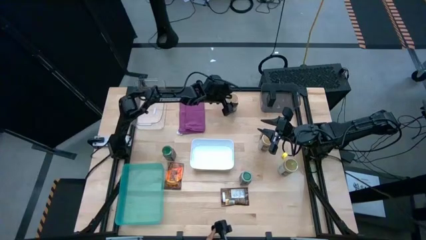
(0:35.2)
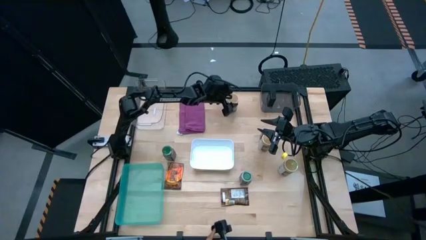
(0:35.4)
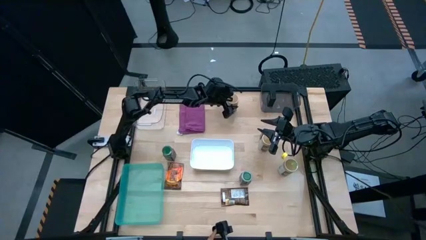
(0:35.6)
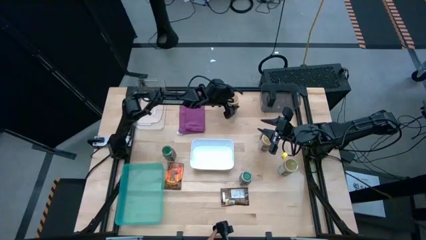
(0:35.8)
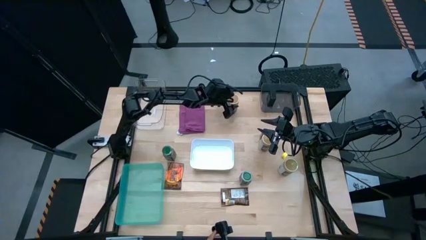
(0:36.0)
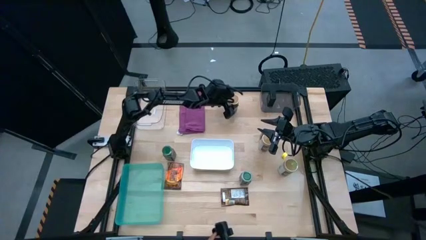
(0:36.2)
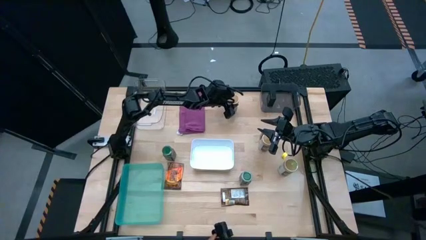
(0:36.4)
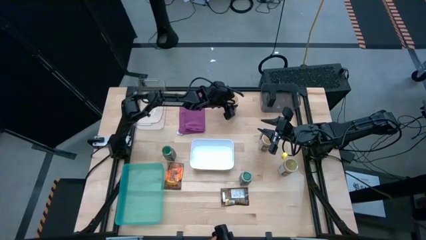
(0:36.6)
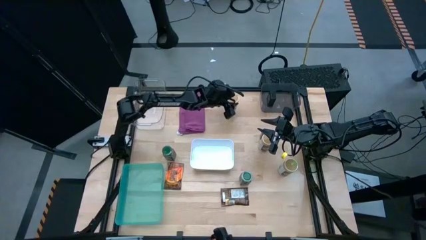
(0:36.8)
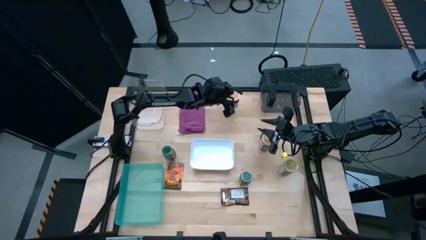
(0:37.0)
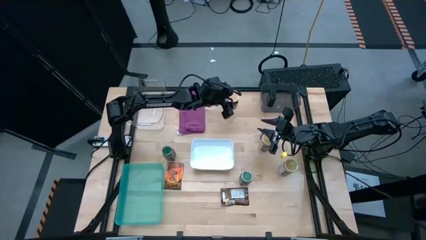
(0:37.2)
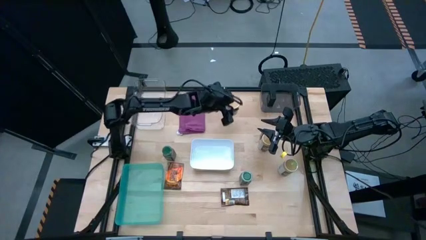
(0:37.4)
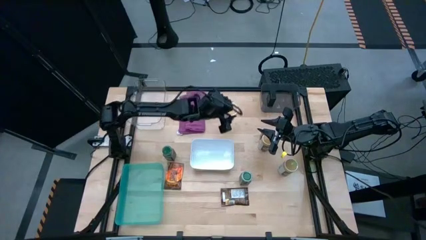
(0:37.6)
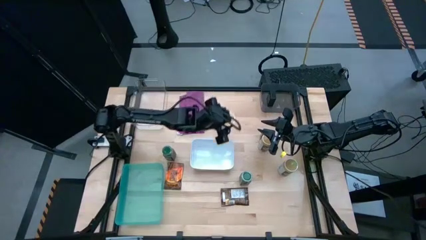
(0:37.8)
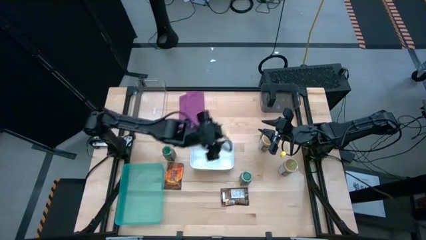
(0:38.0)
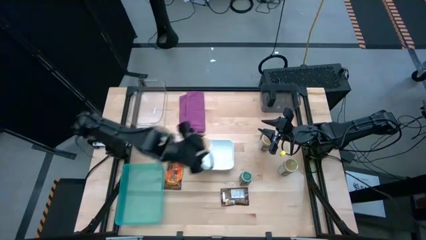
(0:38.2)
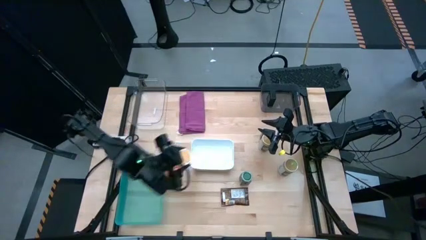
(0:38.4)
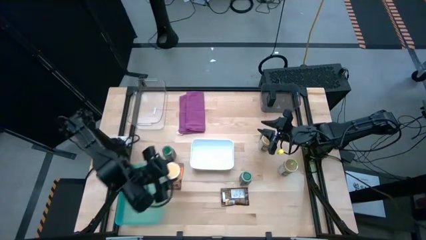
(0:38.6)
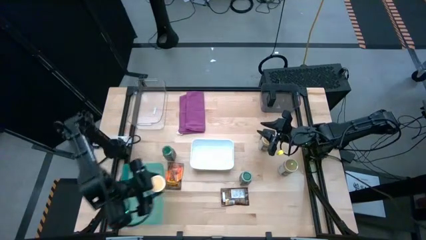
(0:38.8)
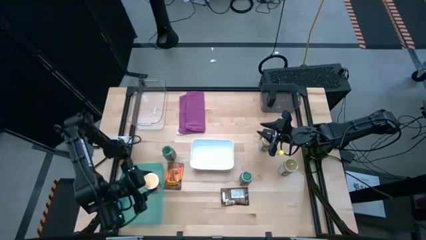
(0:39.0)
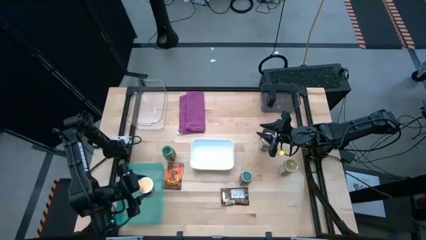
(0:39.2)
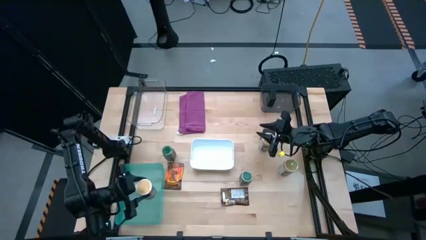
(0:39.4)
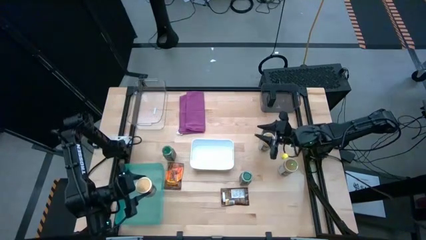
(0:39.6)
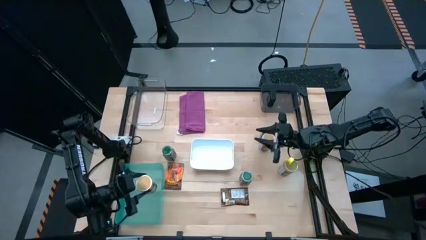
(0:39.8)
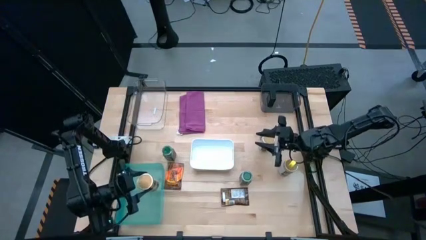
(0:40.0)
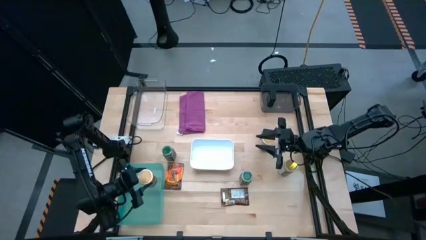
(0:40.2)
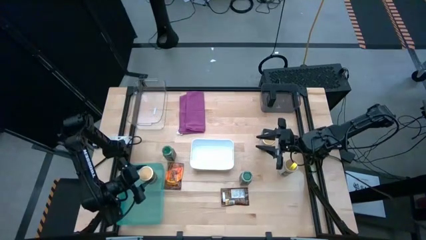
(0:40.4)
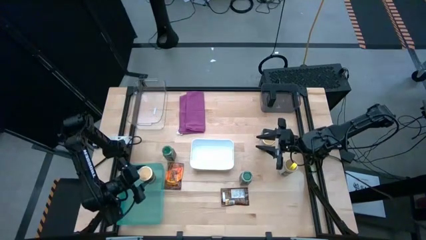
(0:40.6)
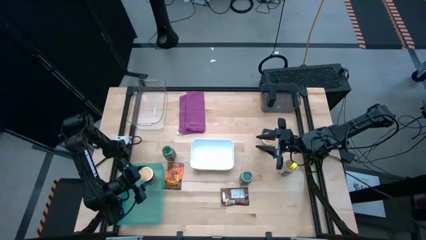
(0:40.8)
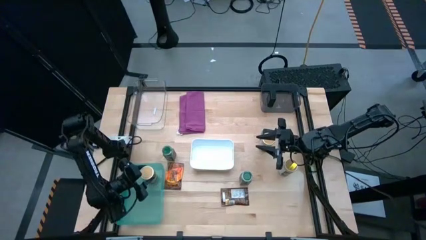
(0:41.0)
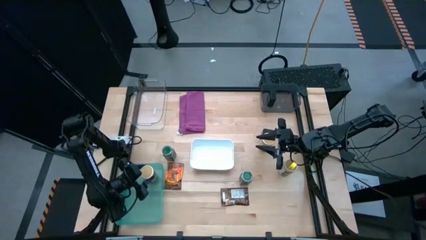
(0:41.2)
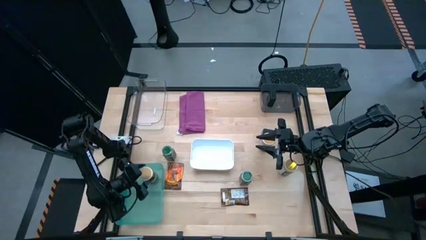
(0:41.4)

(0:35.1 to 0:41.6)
Task: Sort spices by type
Put the top left brown seasoning bottle into the blue bin

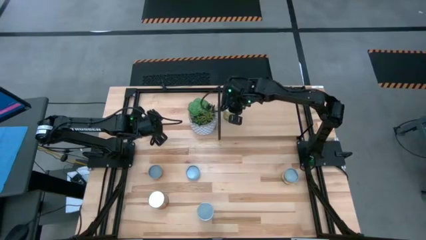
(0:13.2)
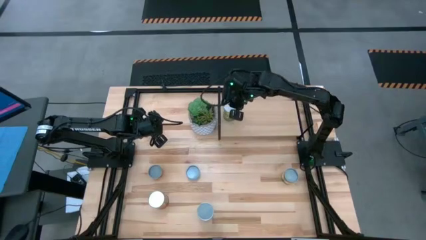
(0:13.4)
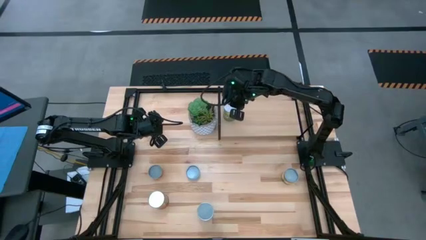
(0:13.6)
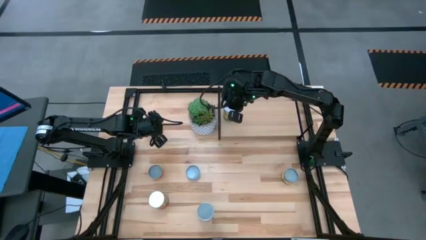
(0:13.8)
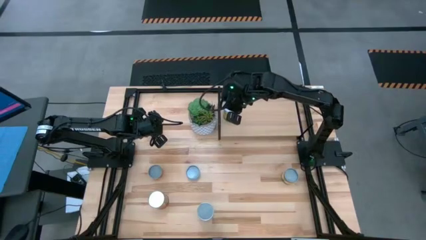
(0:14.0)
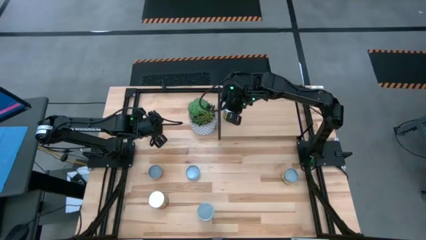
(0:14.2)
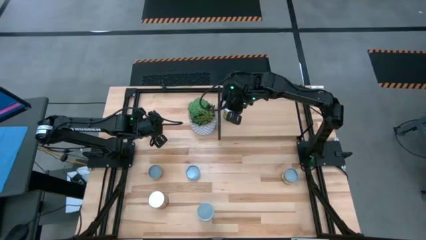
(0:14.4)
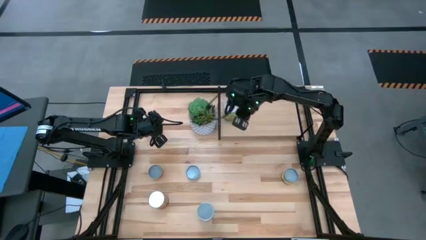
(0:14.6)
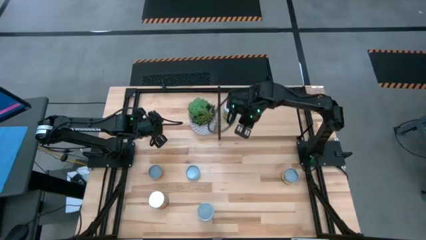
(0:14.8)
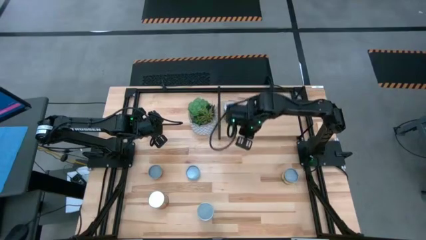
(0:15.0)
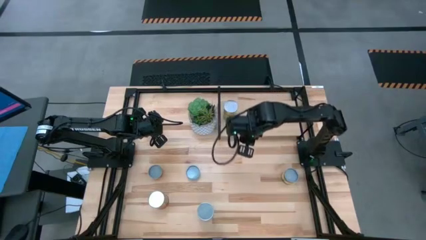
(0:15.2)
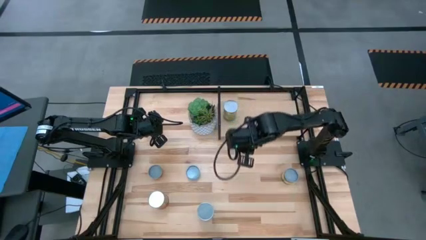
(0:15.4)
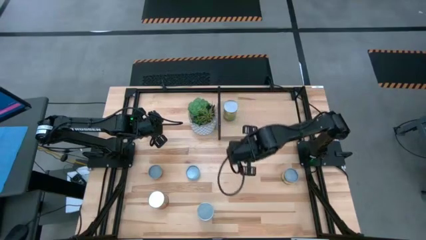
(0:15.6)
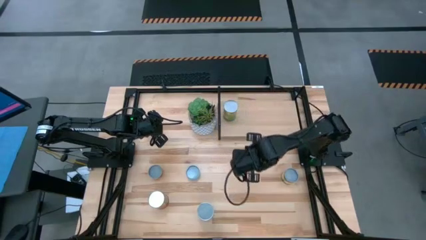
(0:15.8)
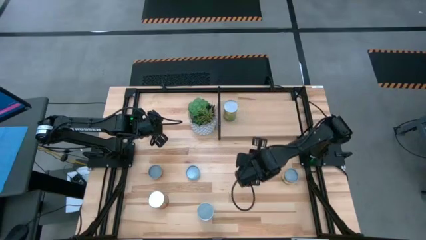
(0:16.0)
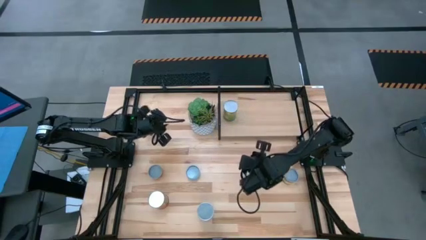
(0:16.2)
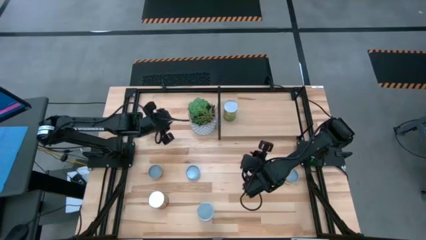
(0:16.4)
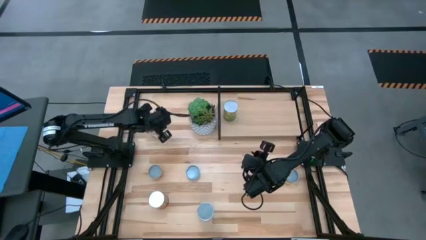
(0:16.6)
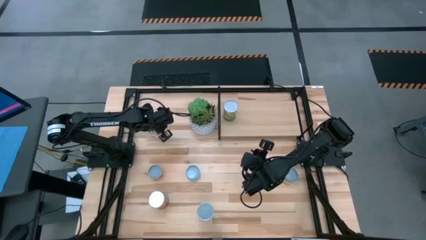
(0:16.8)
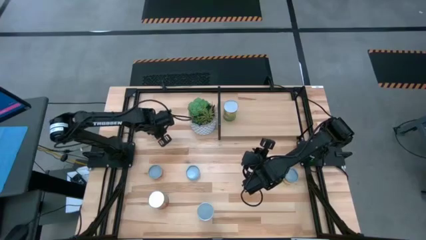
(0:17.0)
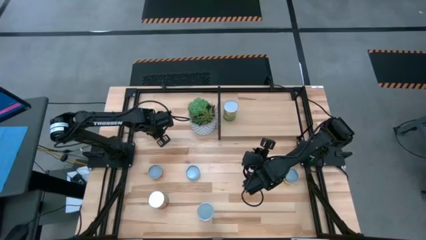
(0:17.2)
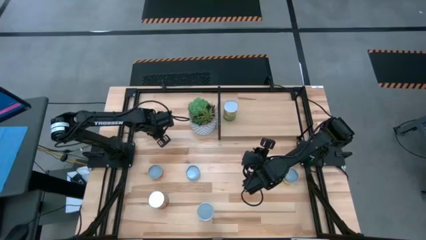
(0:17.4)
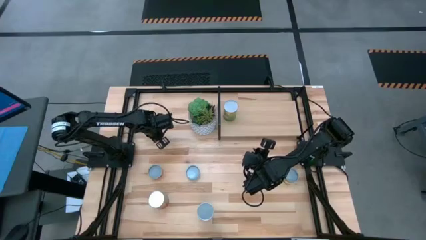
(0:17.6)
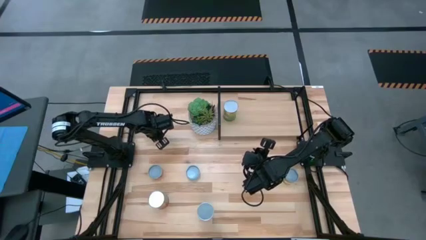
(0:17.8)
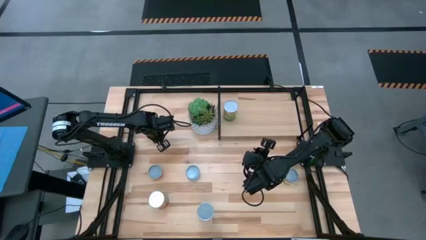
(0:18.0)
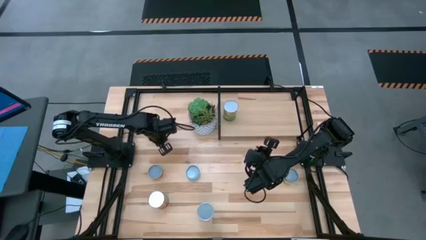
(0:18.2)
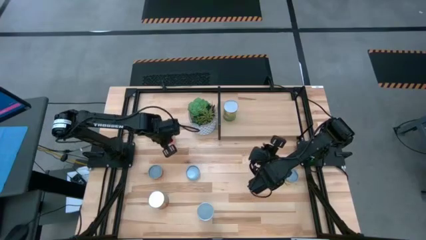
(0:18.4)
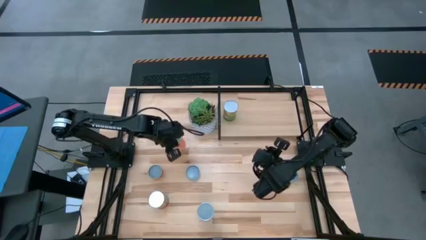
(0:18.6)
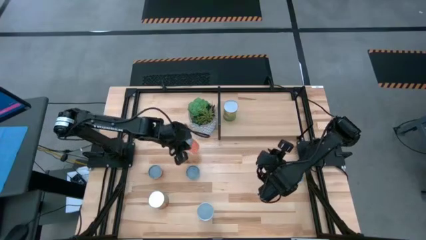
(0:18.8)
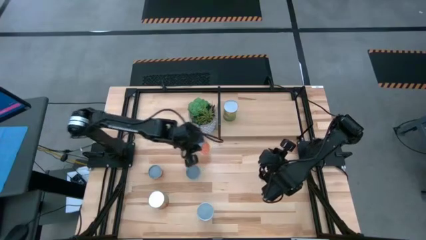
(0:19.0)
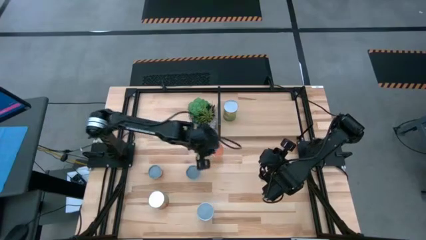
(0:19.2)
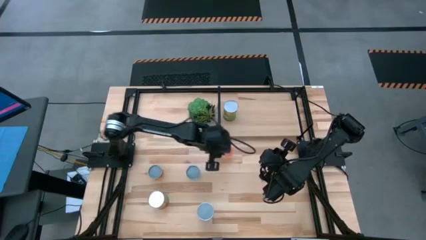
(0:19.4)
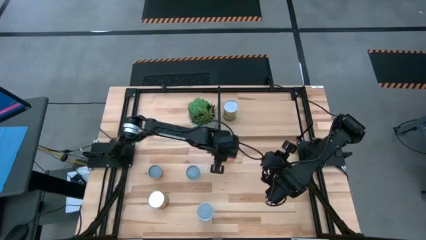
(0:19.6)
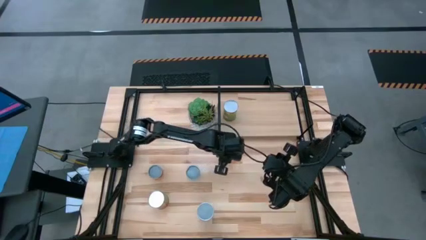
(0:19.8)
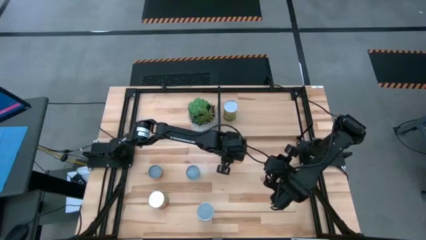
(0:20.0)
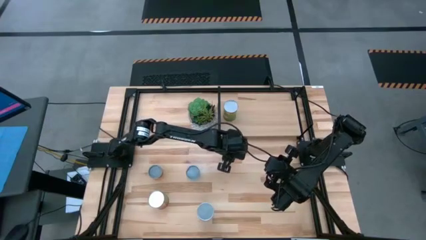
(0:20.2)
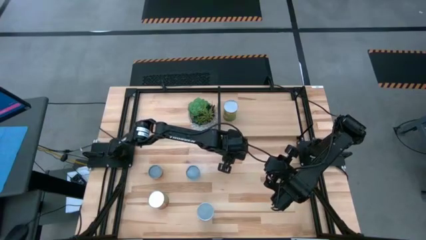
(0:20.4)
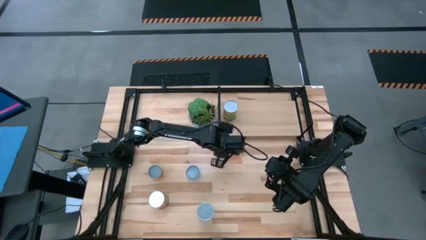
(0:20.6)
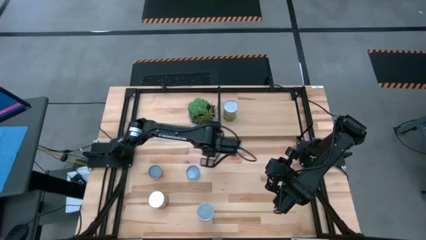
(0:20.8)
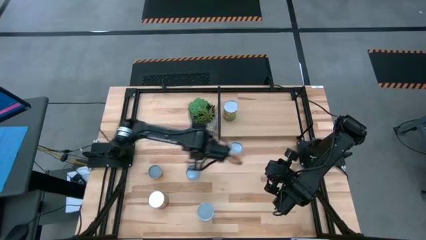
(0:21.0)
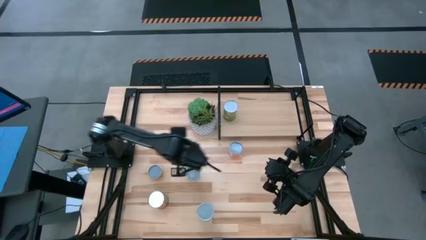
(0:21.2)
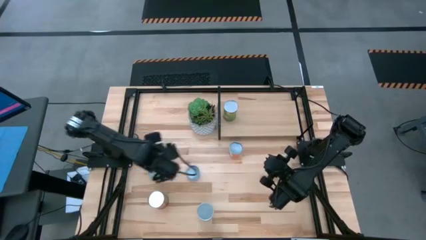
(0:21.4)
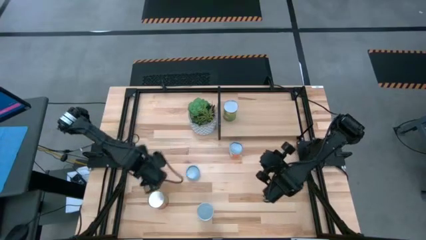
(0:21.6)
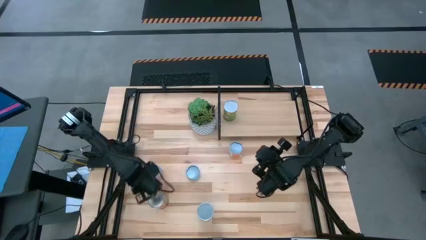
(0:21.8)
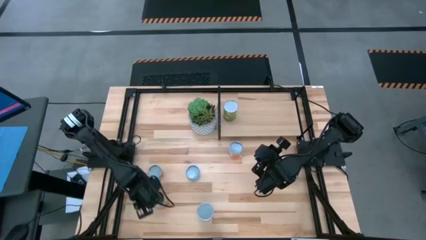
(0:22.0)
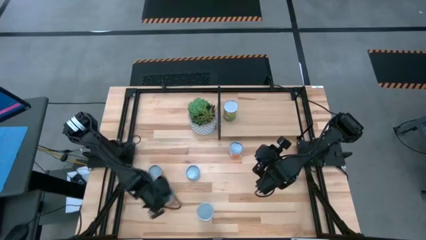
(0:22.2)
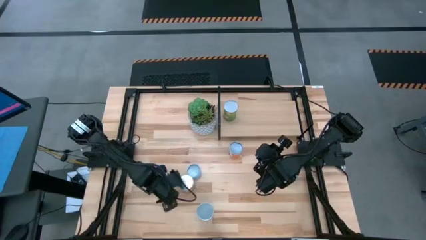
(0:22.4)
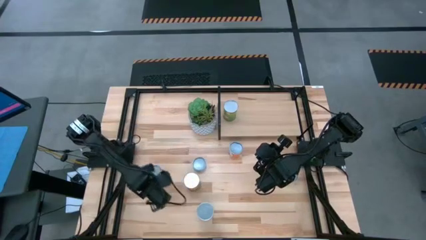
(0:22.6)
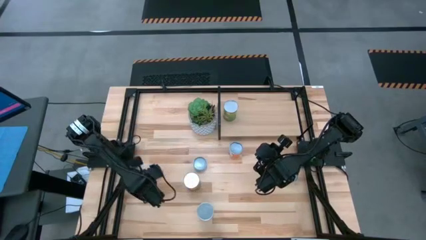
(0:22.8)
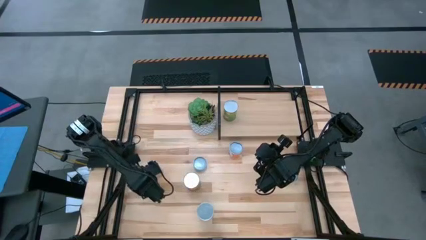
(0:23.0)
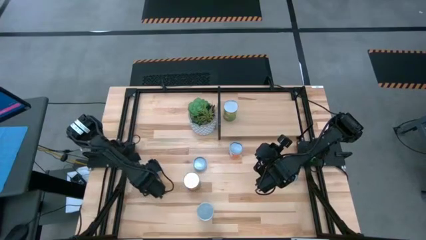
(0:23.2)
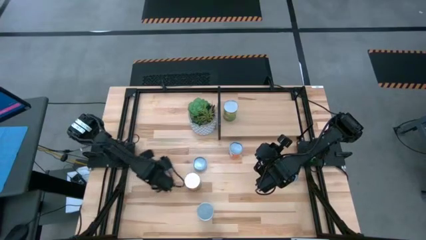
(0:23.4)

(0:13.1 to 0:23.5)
Task: Pick and place cans onto a shelf
Move the canned goods to the center on the table
